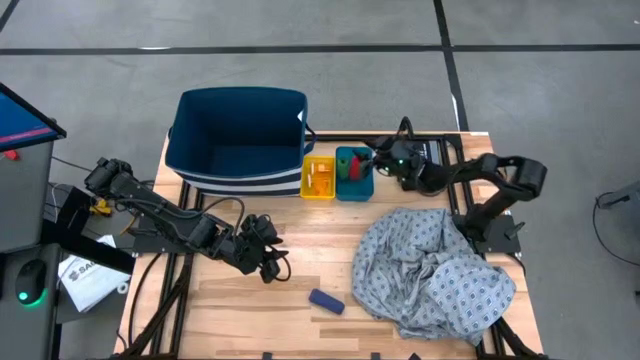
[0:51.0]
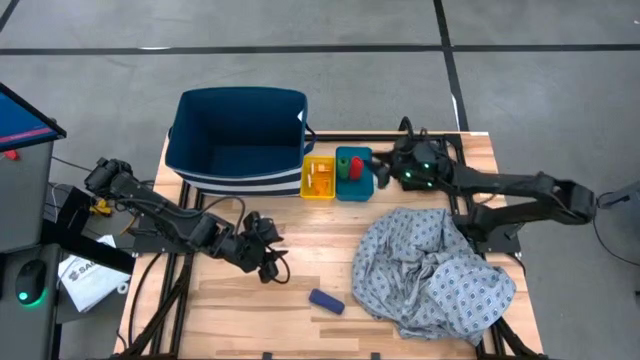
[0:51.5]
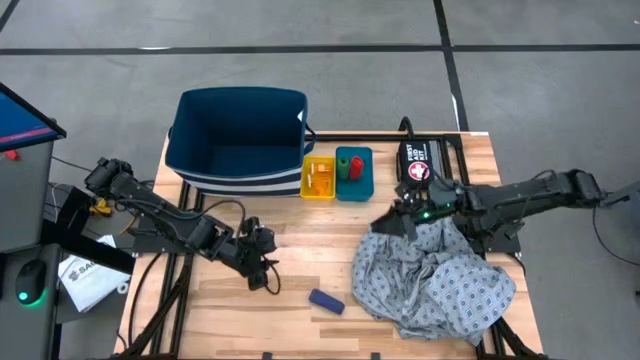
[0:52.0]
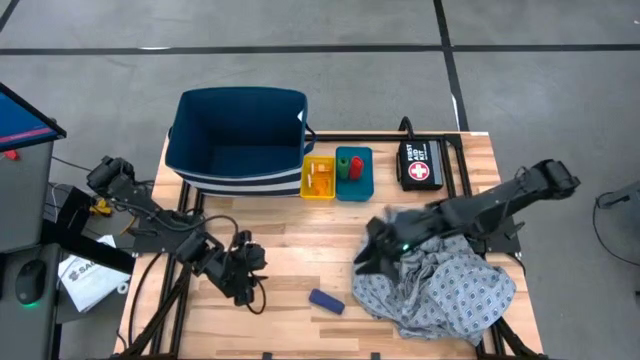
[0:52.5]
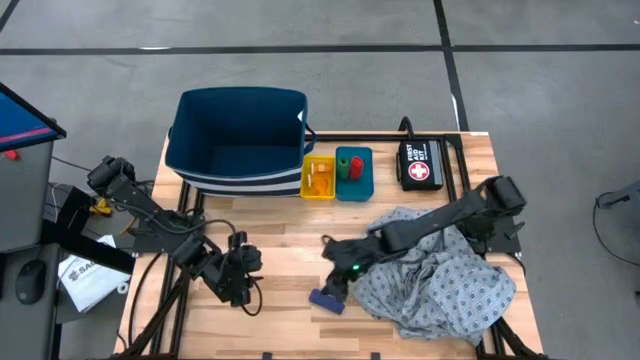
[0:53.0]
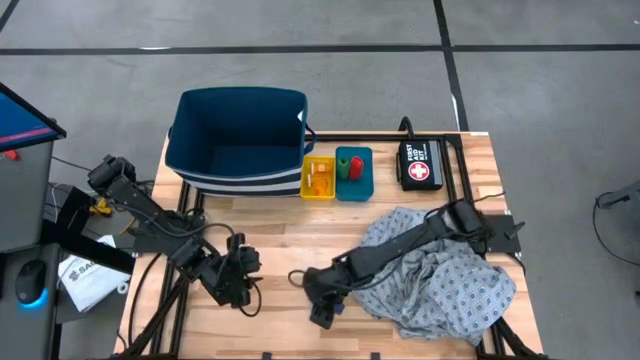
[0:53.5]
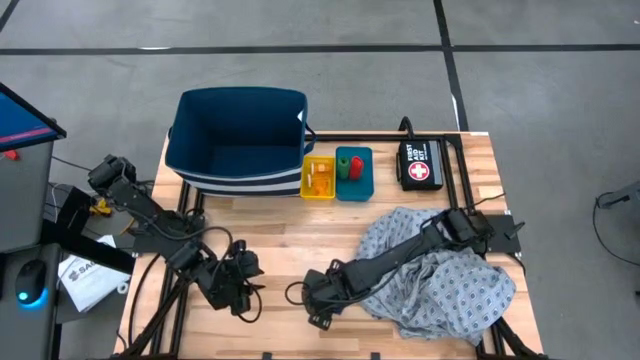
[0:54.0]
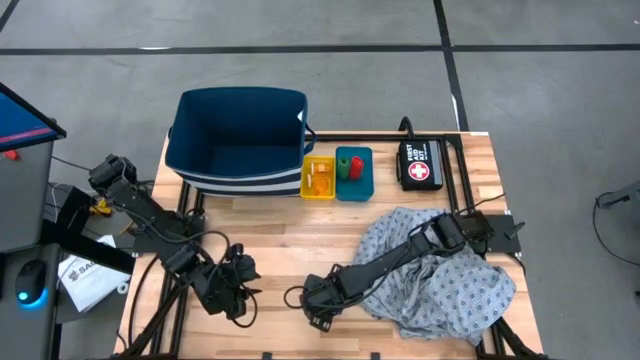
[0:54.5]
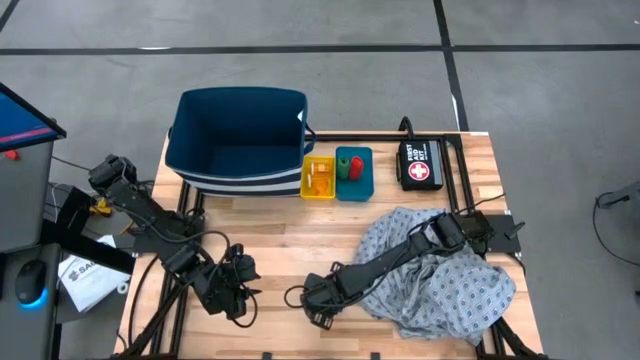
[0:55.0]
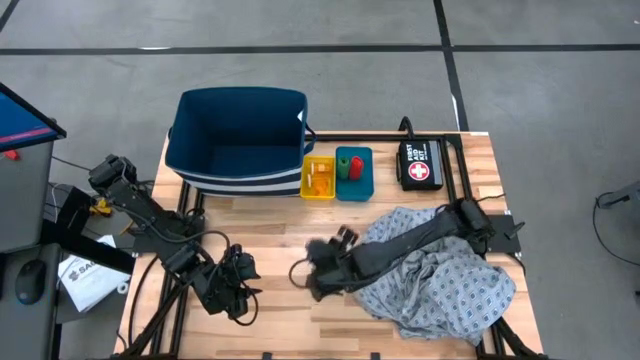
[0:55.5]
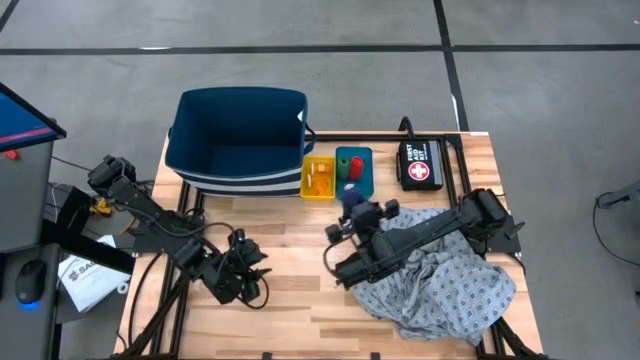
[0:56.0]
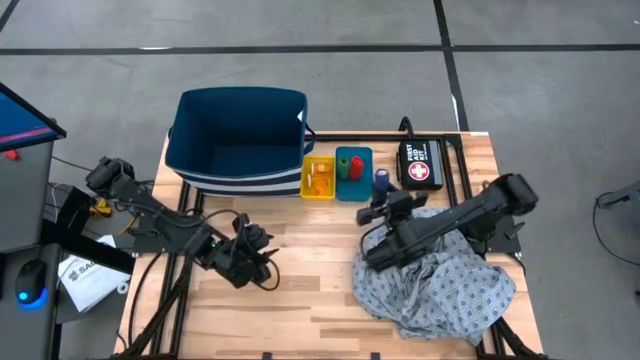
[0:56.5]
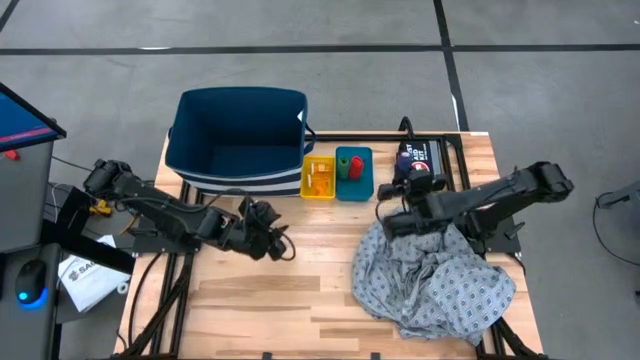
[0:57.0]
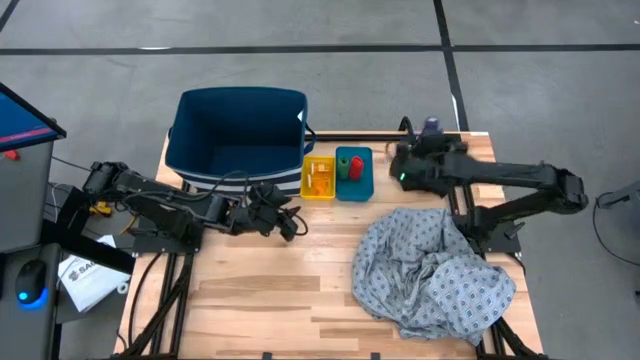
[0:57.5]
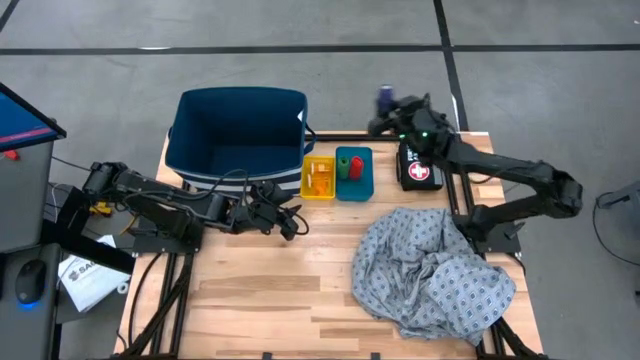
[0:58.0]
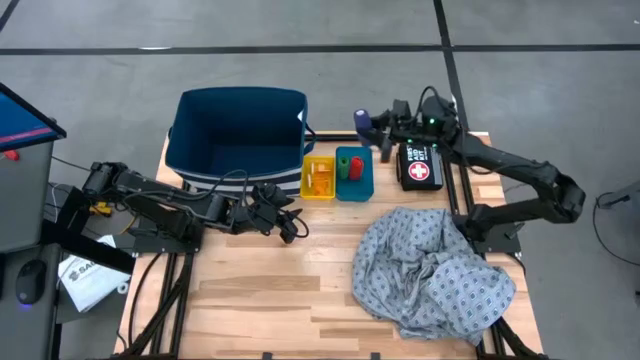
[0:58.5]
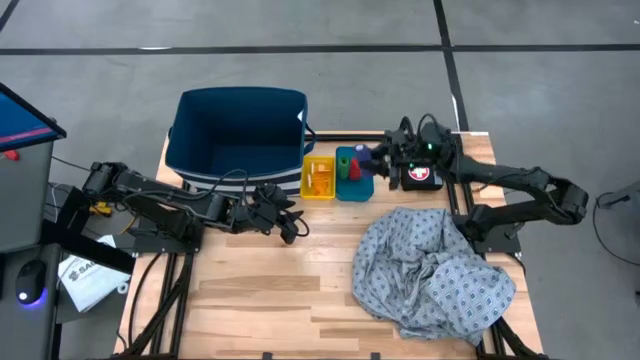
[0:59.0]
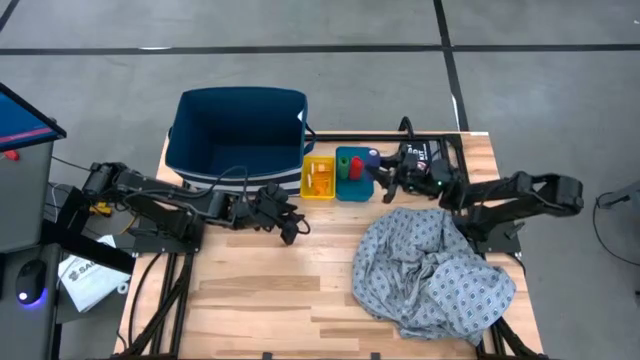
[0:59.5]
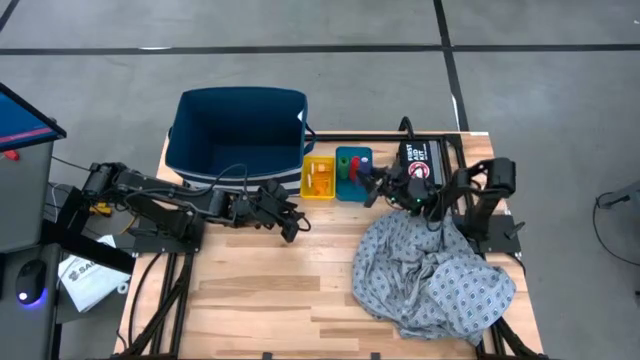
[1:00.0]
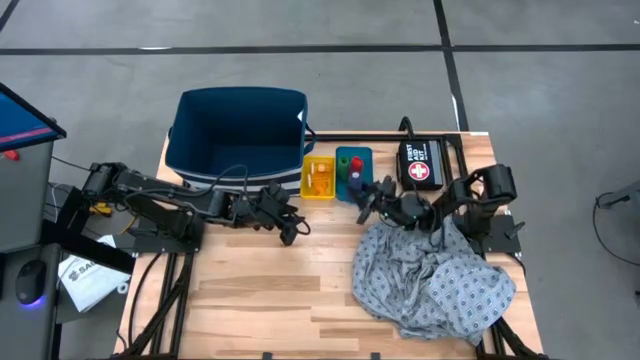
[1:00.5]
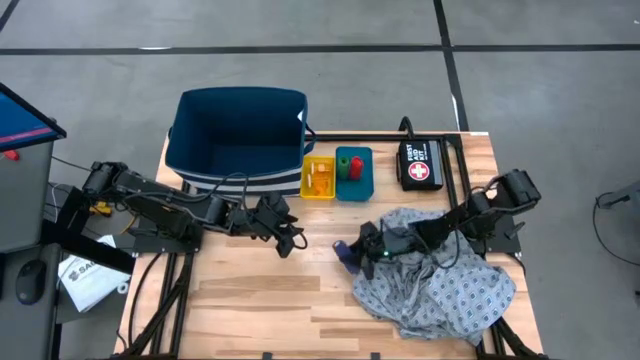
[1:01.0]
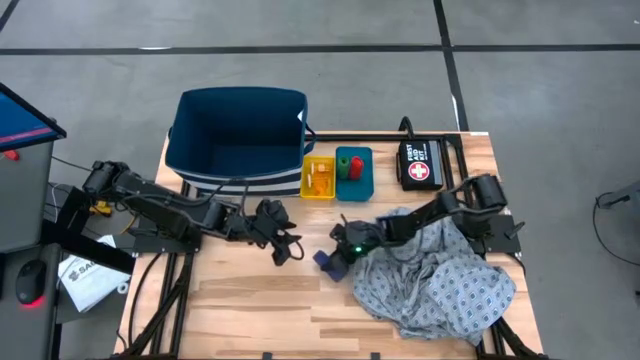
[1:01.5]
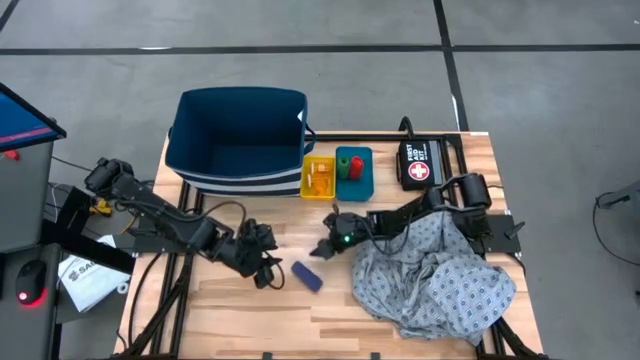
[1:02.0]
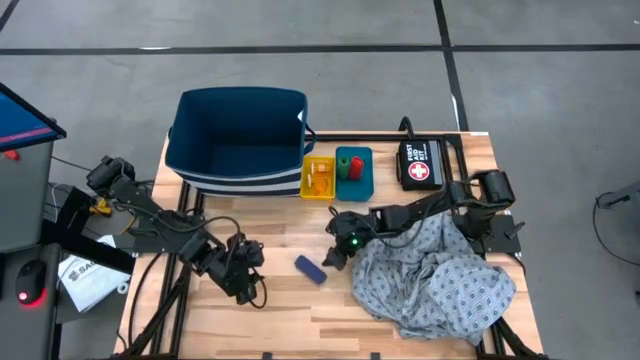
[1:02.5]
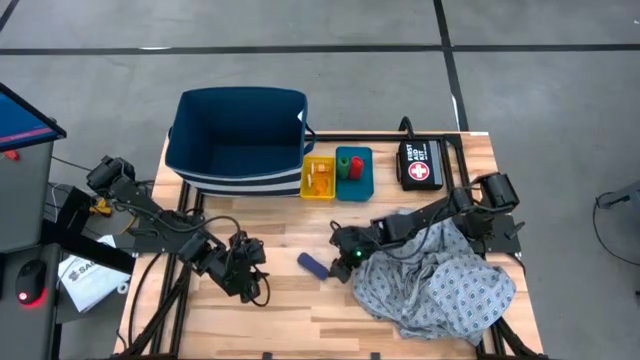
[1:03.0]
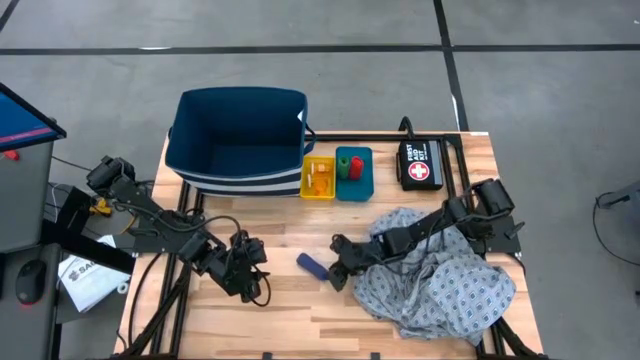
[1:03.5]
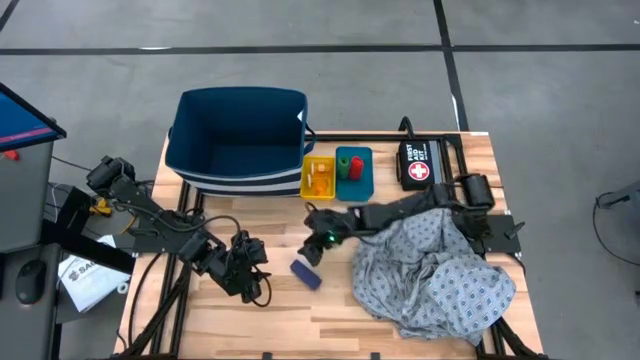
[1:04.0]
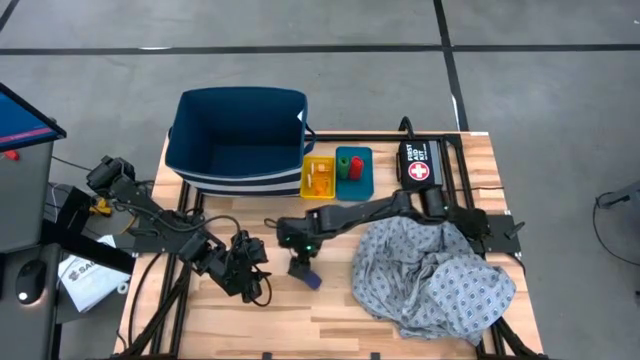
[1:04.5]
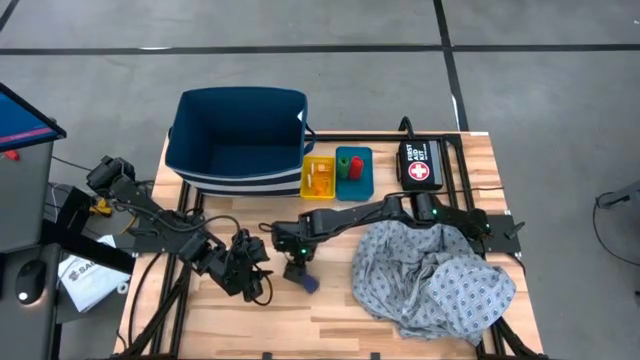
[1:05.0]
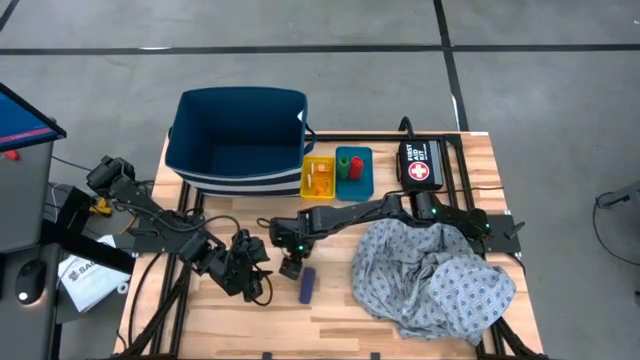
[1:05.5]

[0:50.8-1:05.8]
Task: Pick & place medical supplies in basket/bin
Put the blue bandage into the right blue bin

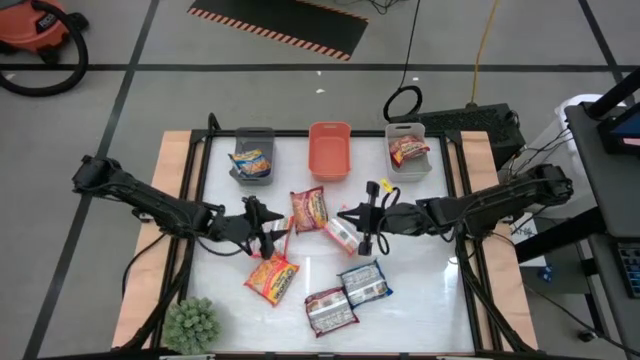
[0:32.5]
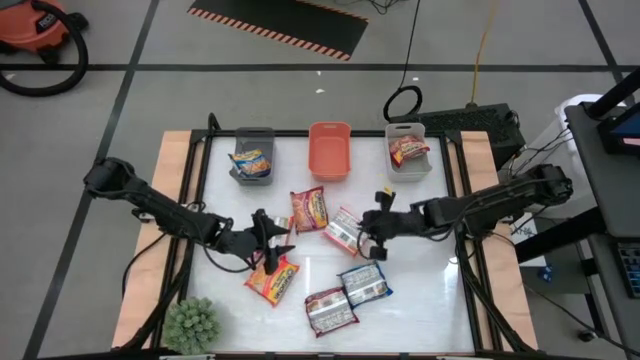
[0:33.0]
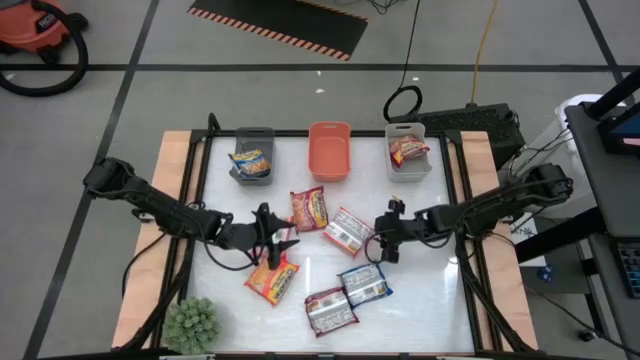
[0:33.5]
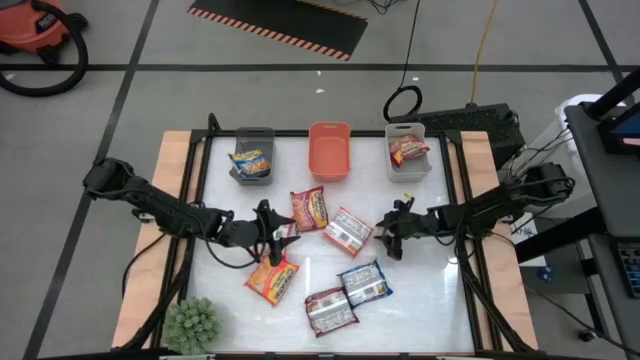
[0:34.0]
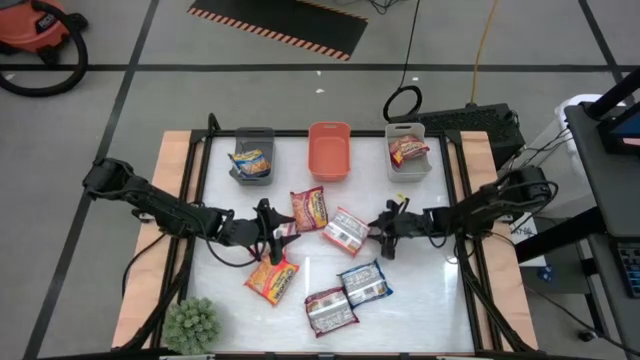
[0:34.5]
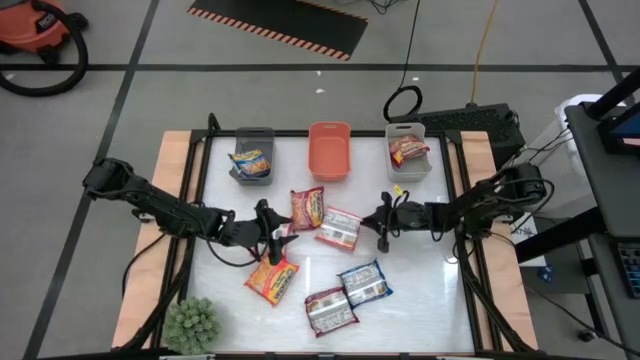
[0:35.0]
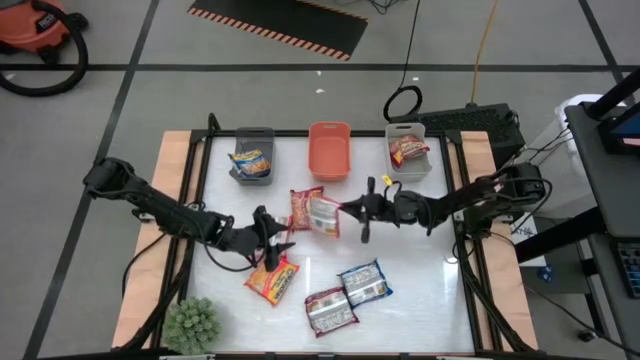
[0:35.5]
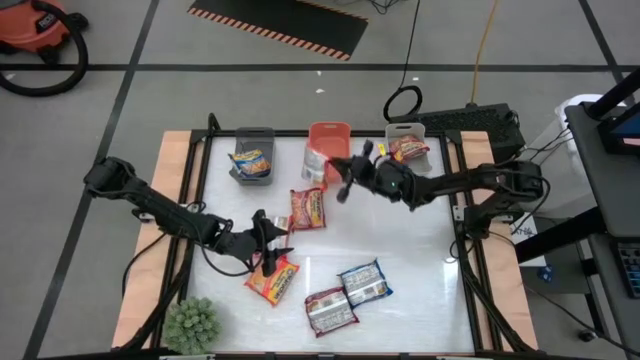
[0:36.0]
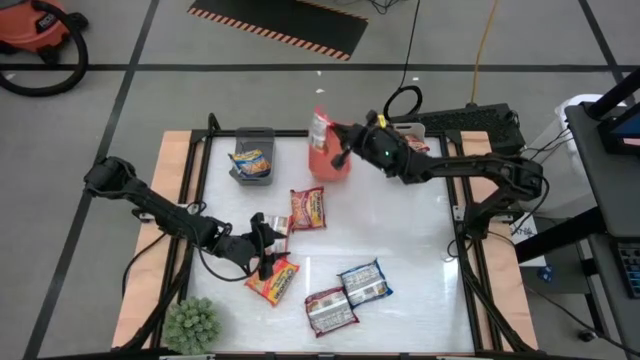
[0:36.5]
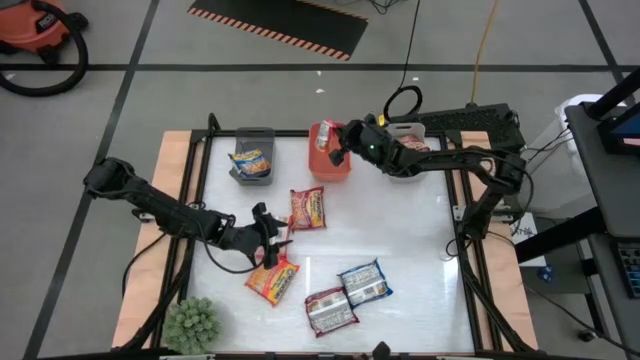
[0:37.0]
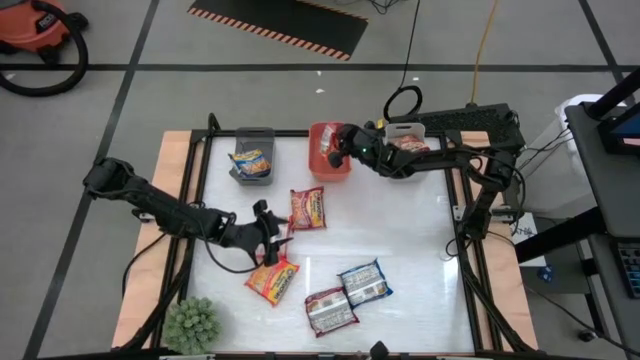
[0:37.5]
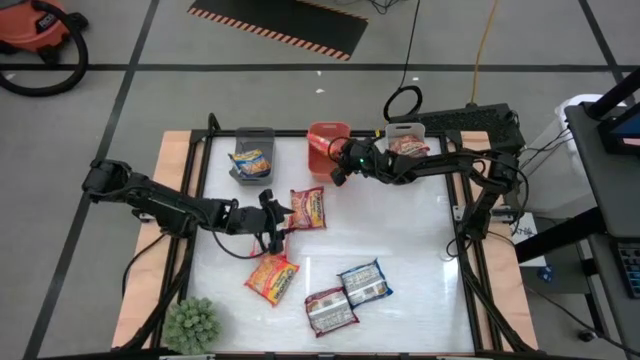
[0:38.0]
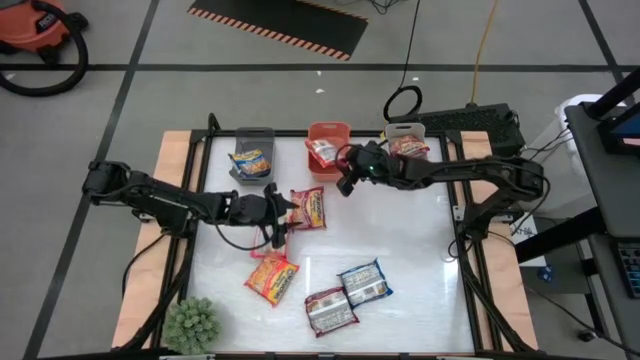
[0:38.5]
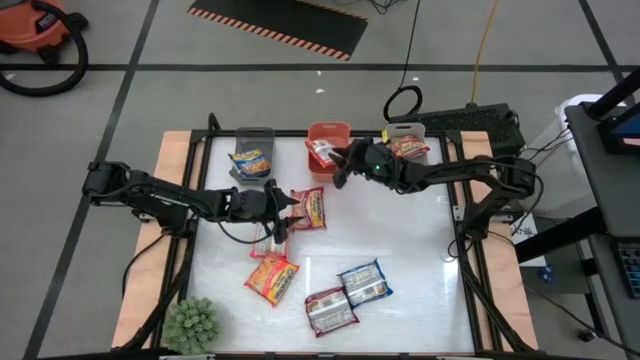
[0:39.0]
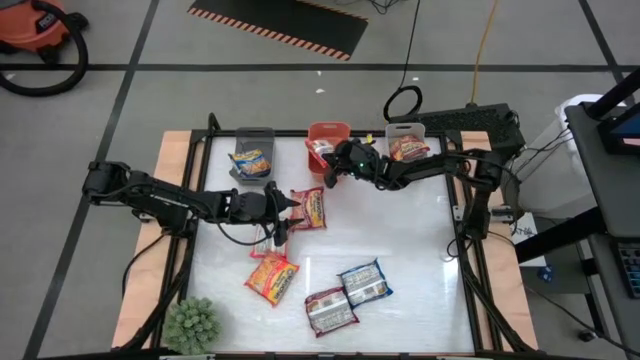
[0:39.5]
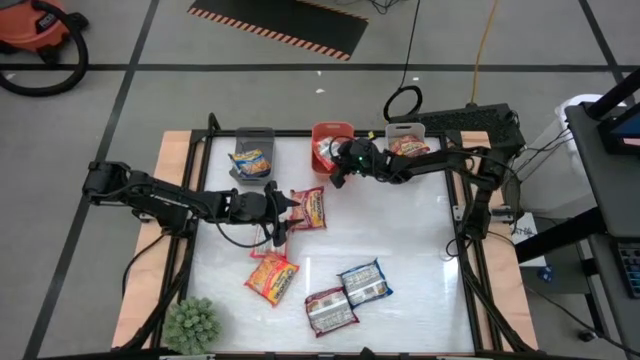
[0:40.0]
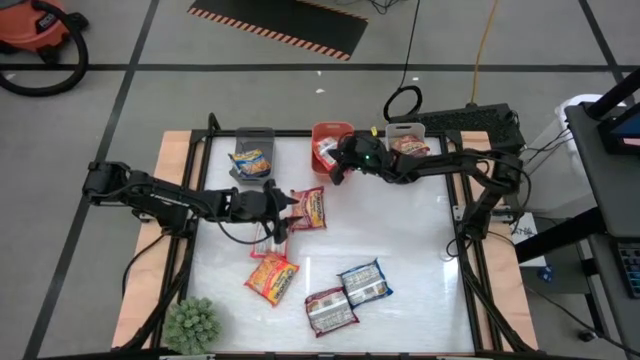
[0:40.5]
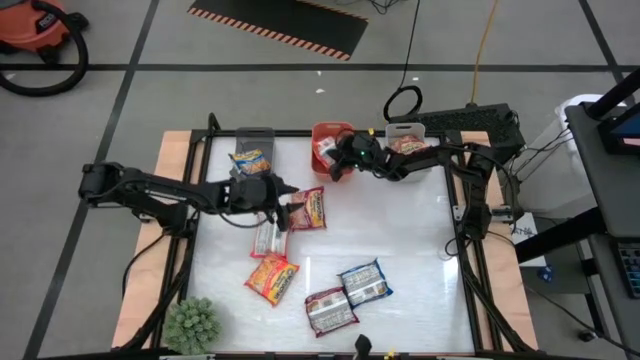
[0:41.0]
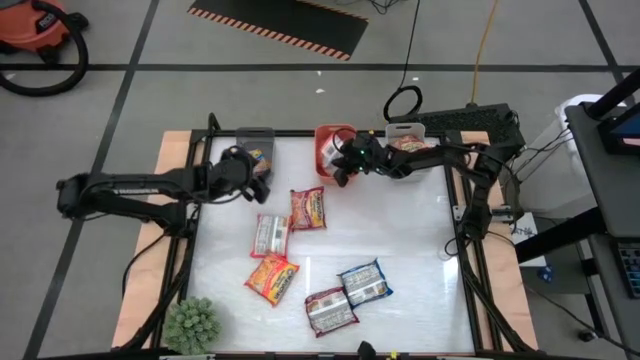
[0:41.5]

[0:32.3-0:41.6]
Task: Sort Maruchan noodles
Put the top right orange noodle pack into the orange bin
